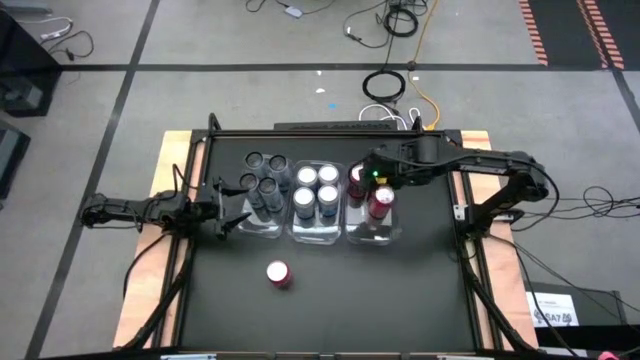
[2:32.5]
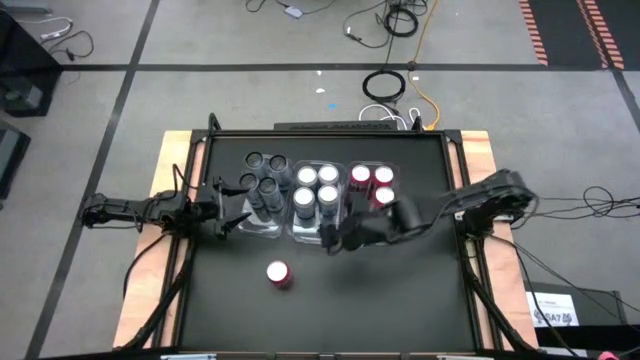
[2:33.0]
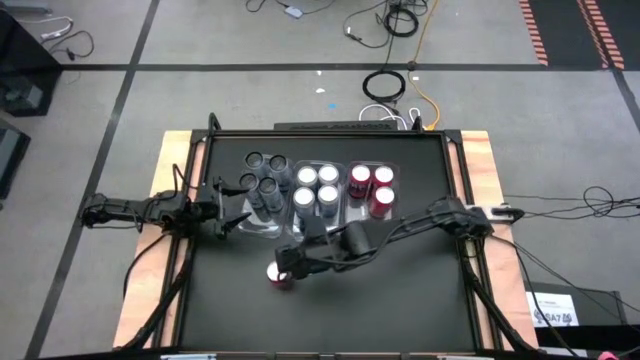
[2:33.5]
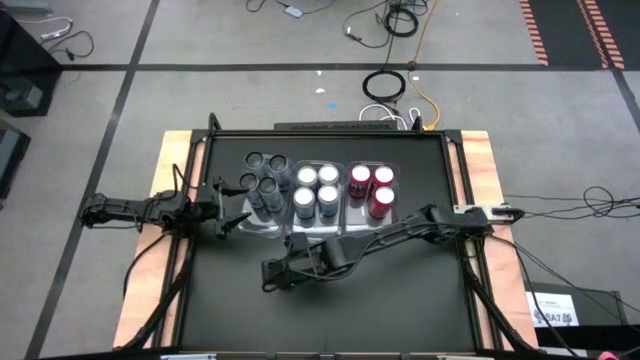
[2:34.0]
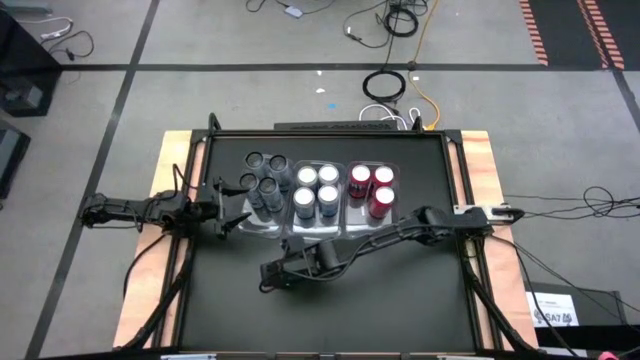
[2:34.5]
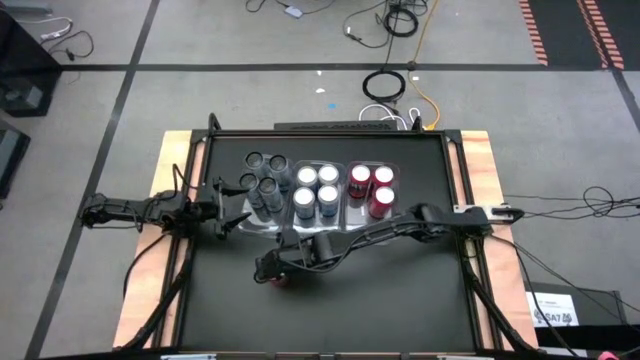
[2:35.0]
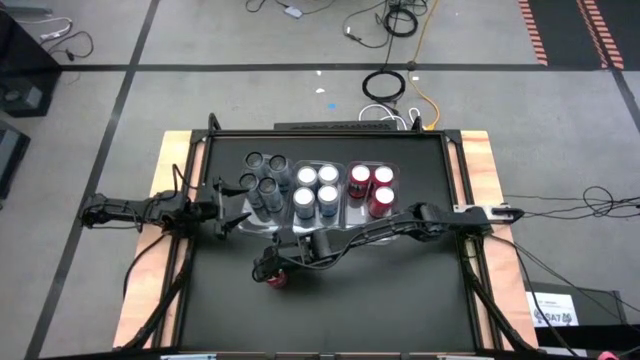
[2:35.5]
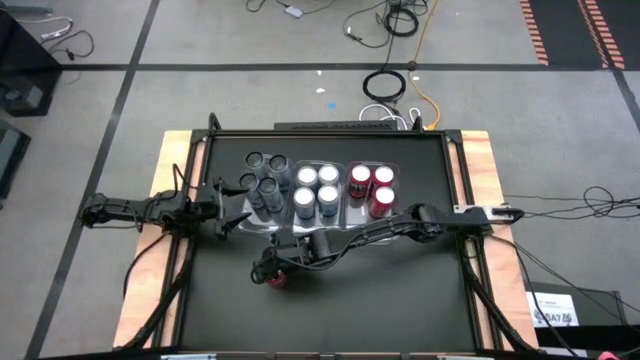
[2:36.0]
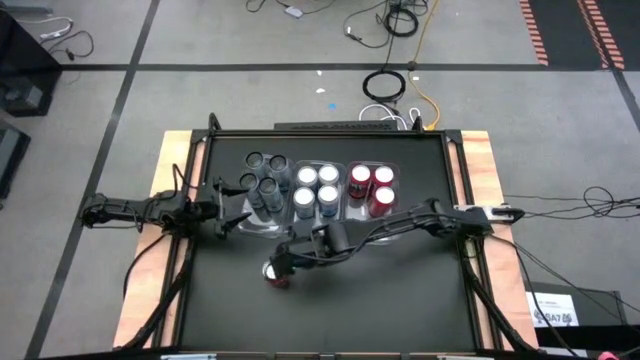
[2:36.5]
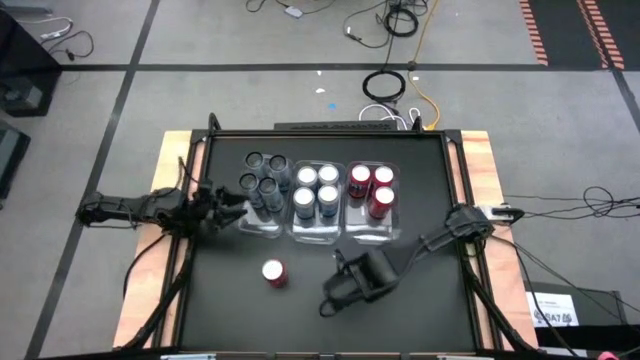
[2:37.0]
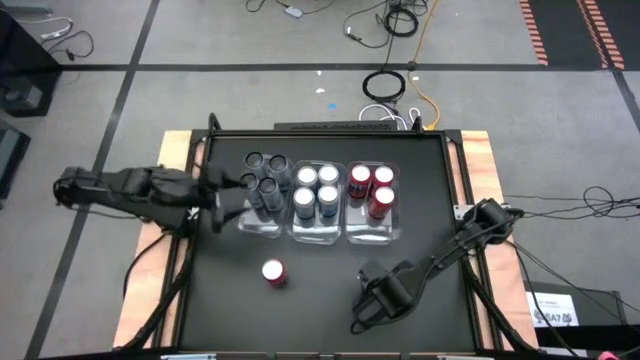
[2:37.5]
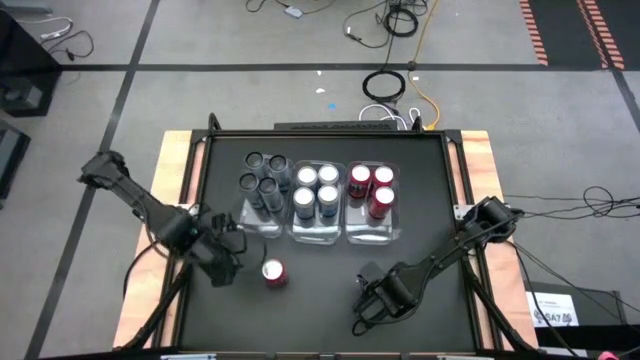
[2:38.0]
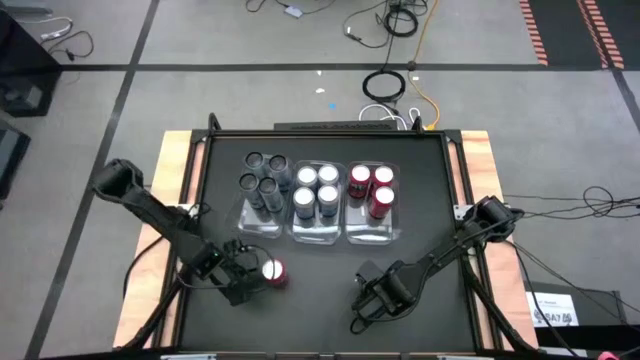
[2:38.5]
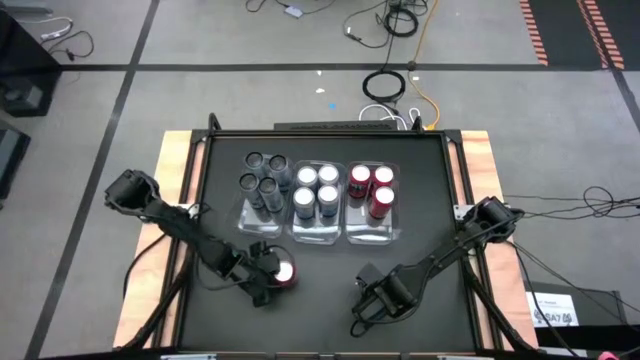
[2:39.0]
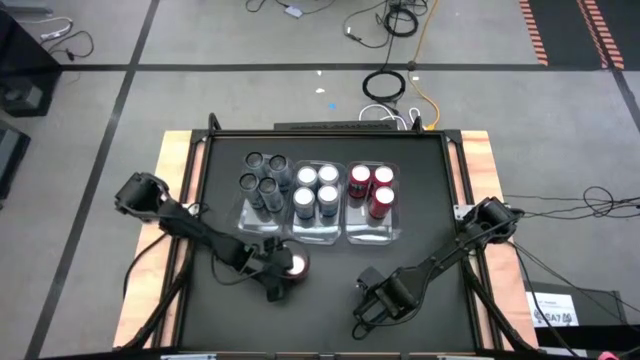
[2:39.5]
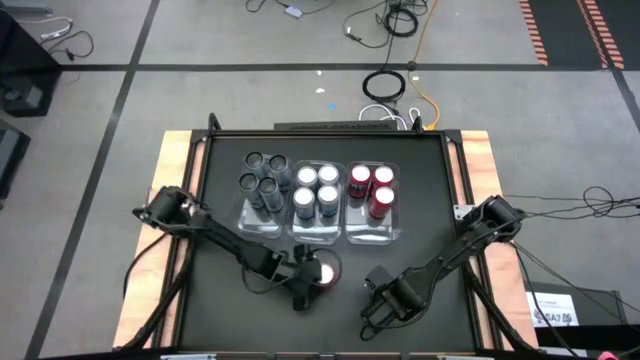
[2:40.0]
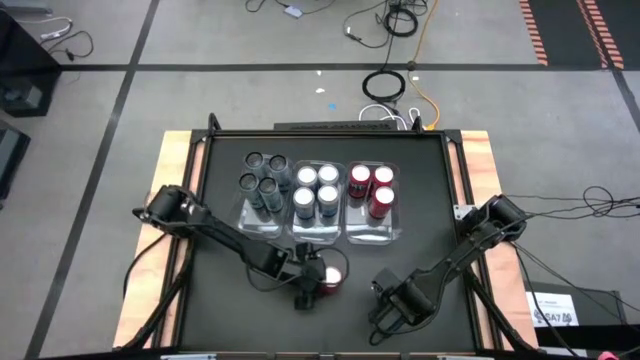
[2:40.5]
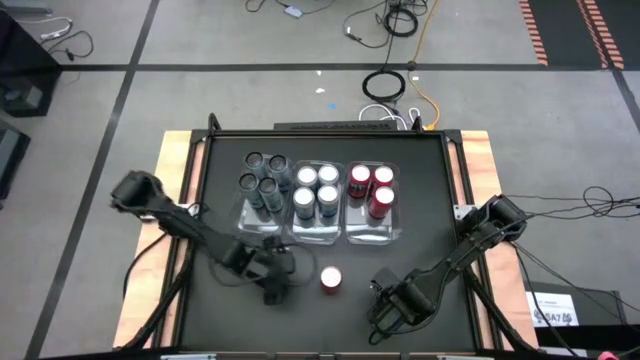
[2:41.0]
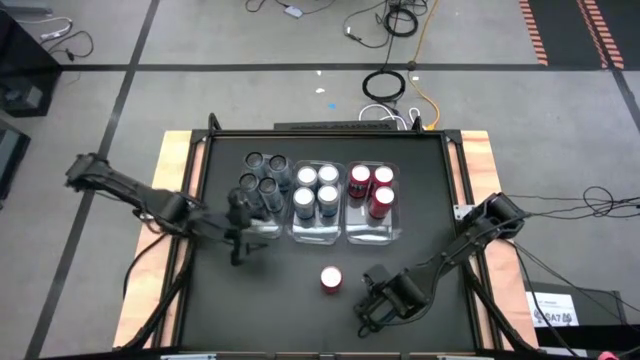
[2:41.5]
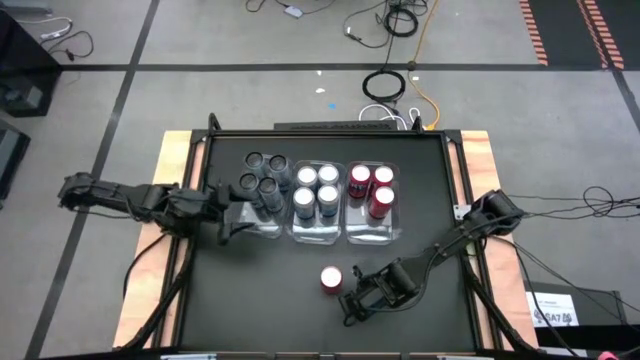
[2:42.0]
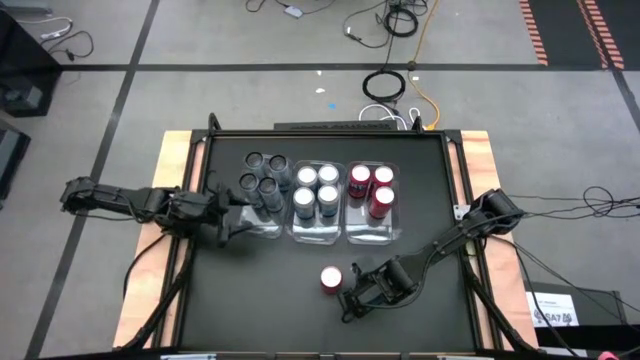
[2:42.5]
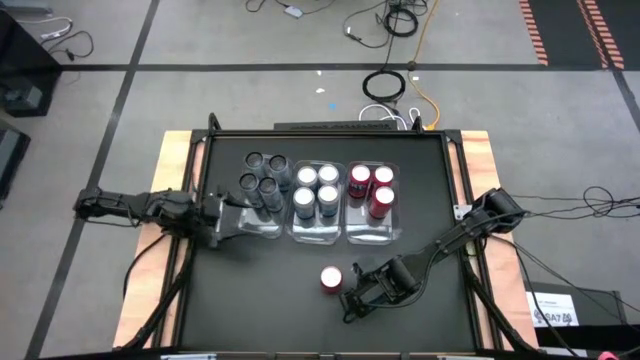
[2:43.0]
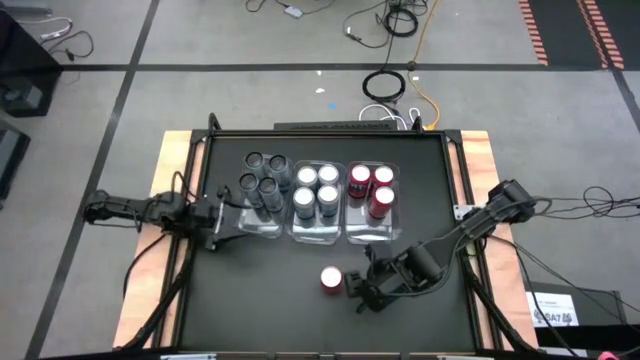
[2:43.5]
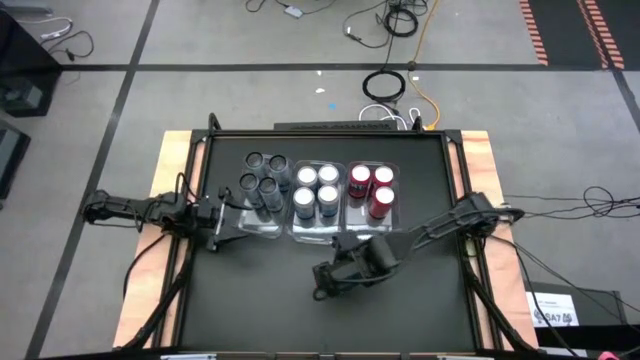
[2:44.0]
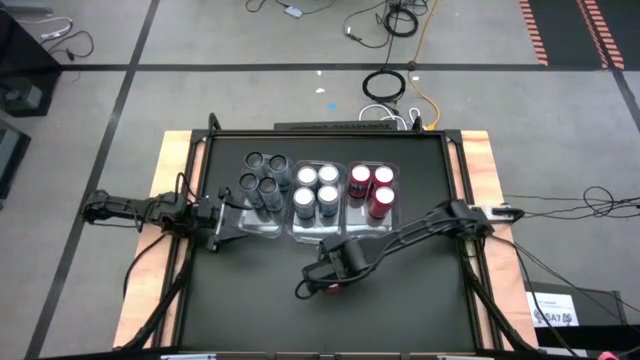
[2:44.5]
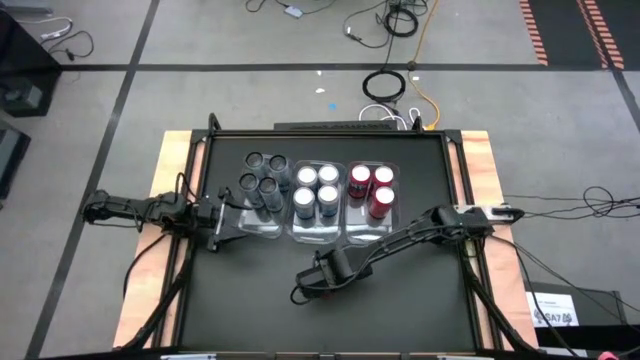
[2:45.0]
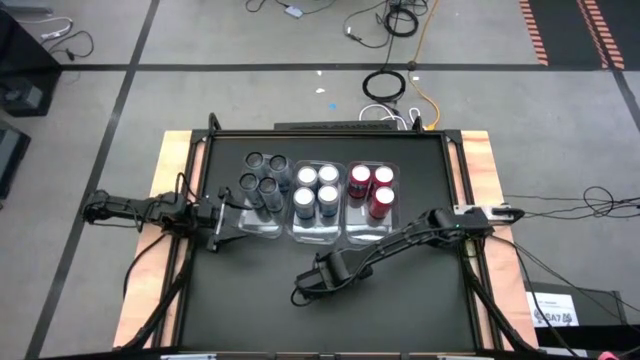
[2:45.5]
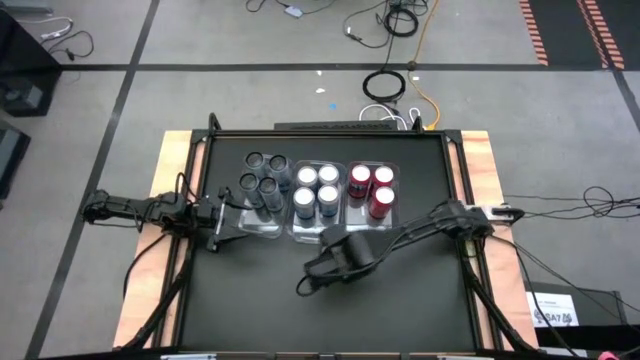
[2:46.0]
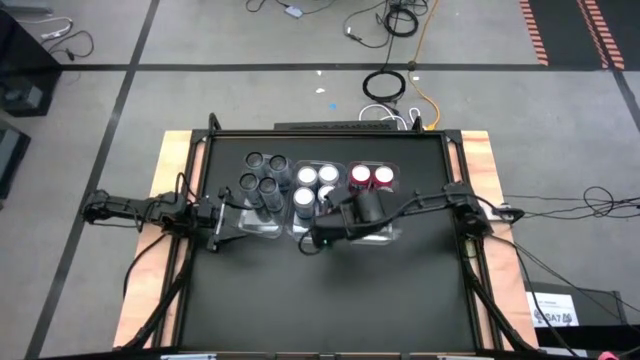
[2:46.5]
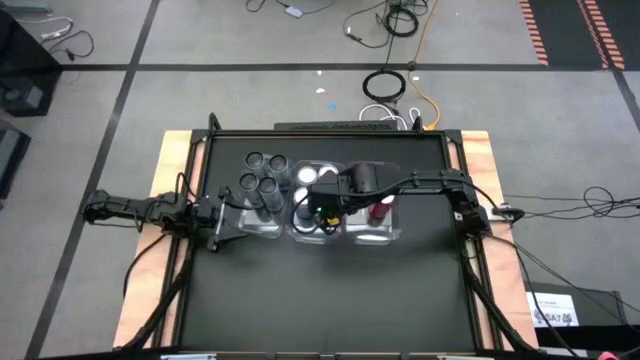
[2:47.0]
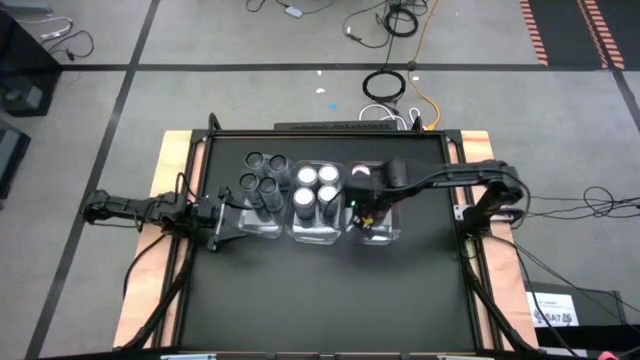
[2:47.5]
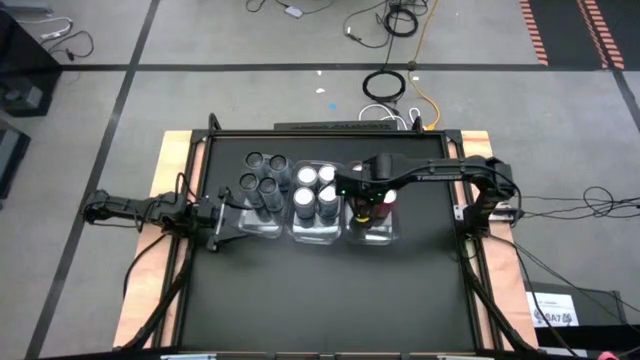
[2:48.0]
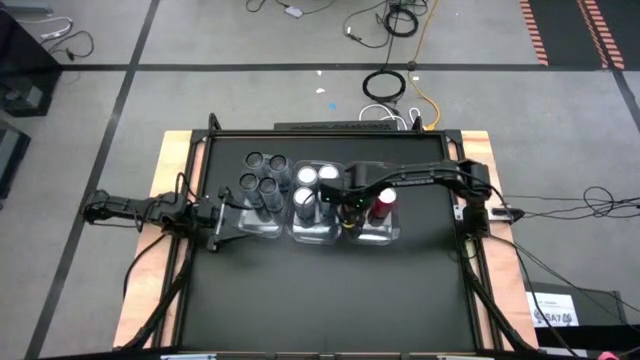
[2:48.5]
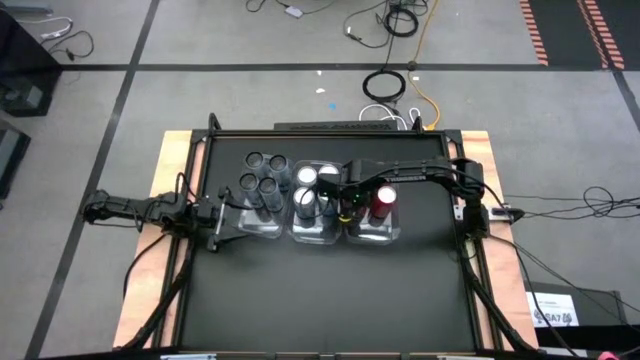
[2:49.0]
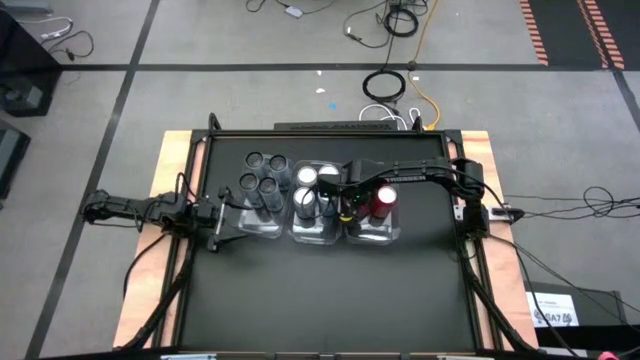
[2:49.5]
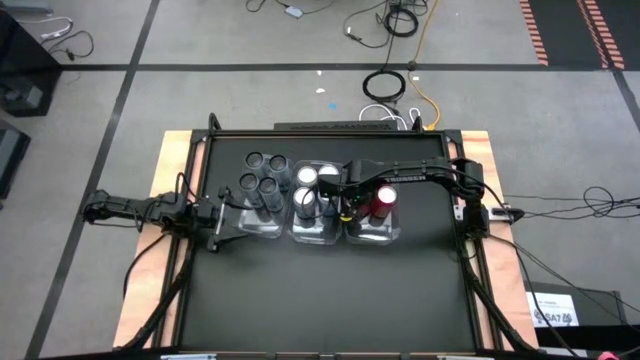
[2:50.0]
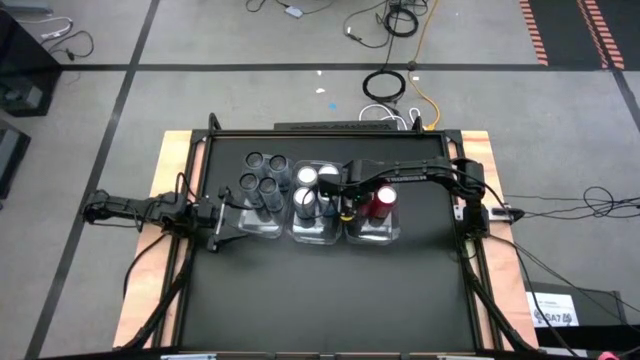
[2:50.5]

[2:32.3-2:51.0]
Task: Sort soda cans
Put the red soda can into the right transparent bin

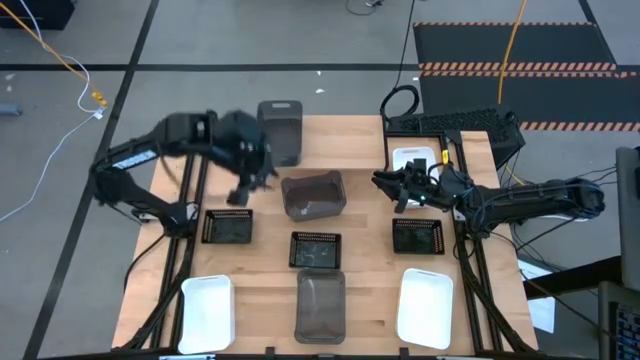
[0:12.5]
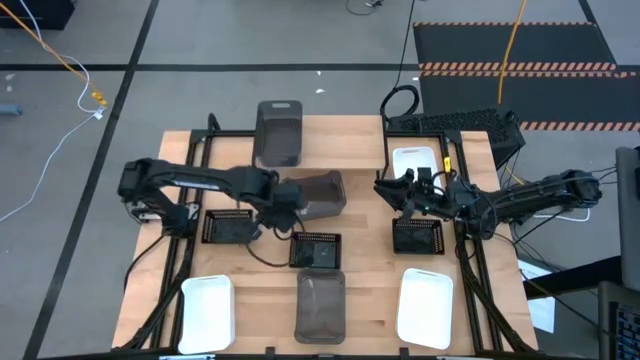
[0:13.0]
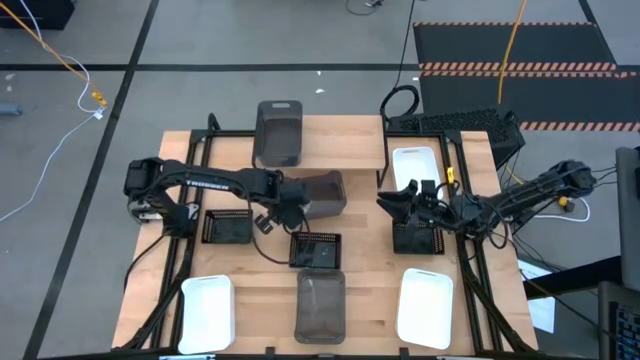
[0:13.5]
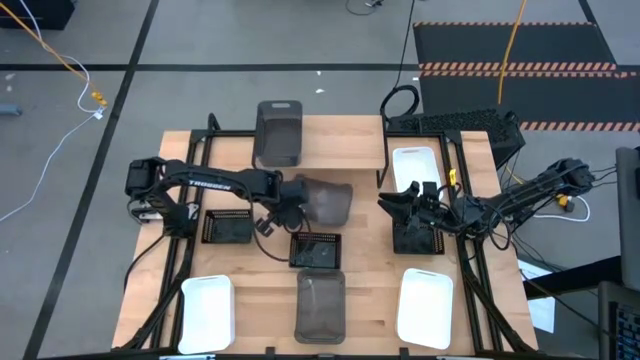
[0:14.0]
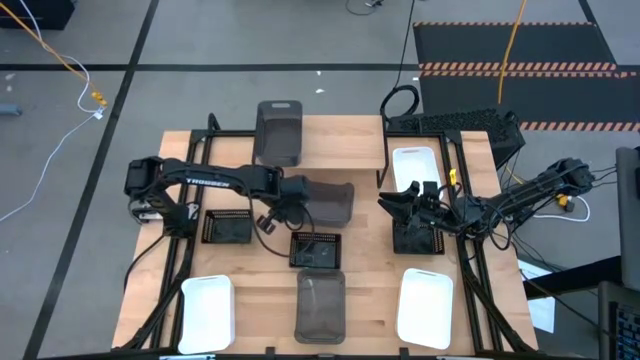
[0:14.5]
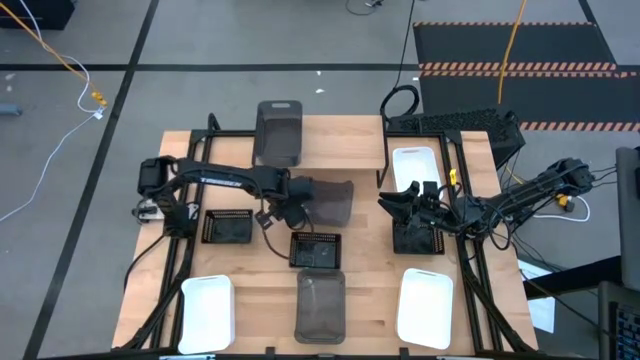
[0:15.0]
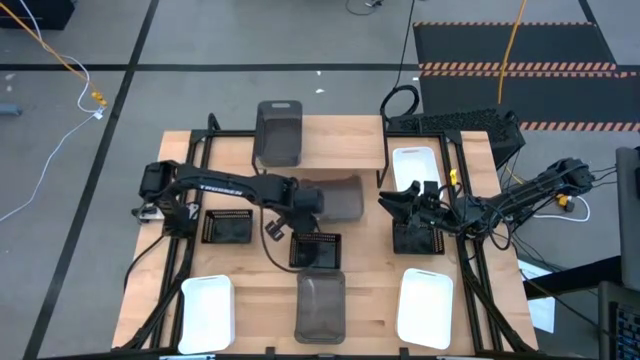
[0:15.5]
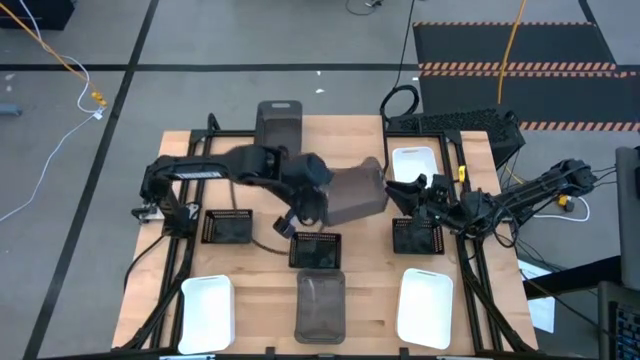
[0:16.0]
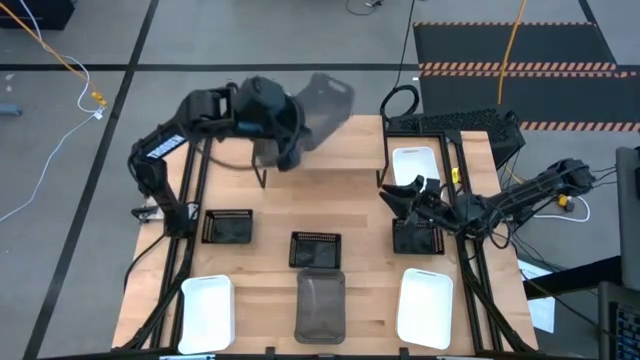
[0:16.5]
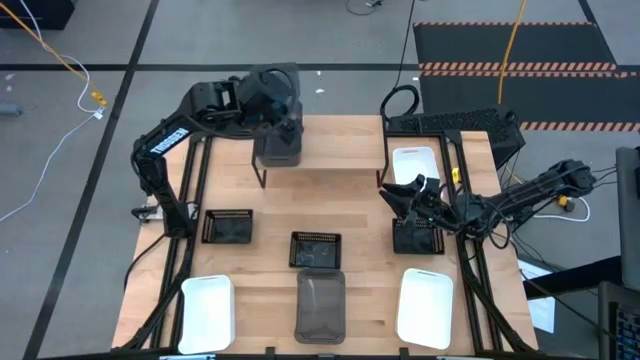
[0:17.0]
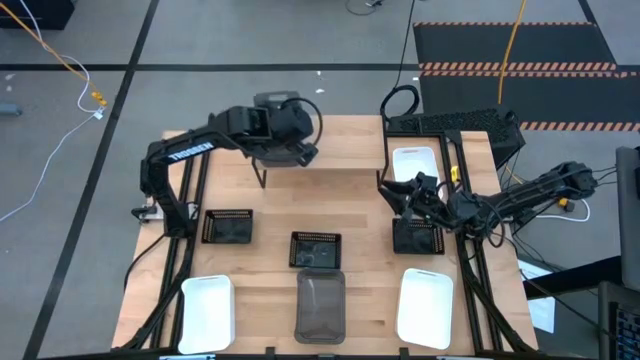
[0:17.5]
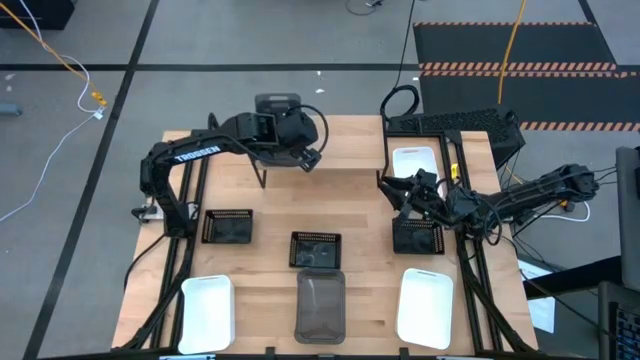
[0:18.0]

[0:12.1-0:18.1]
Task: Stack baskets on shelf by color
Stack the top light black bin on the other light black bin on the shelf
